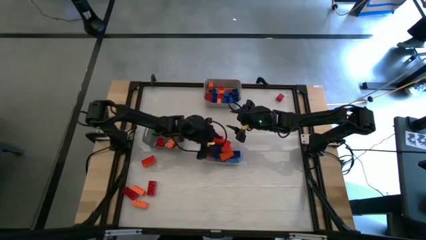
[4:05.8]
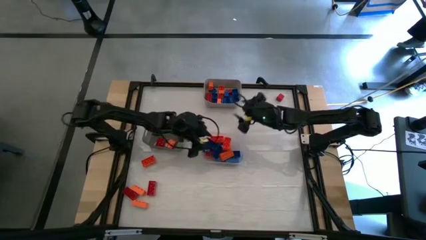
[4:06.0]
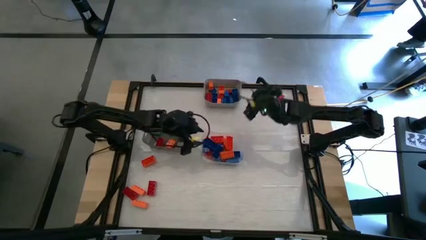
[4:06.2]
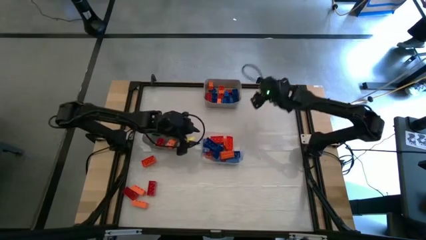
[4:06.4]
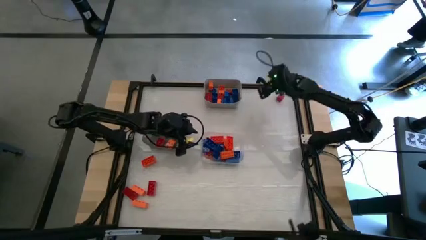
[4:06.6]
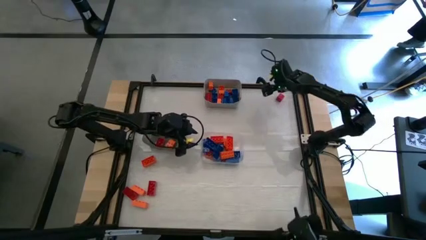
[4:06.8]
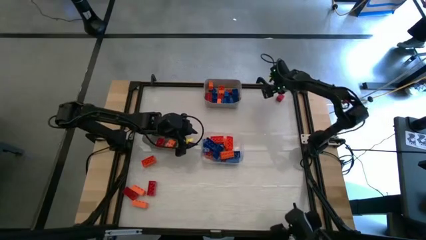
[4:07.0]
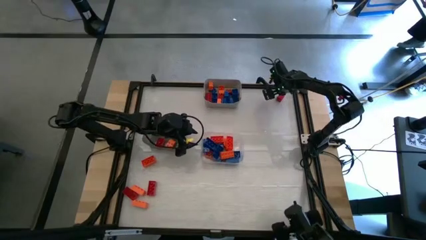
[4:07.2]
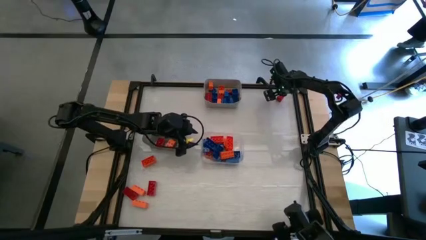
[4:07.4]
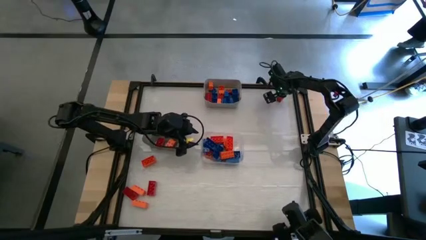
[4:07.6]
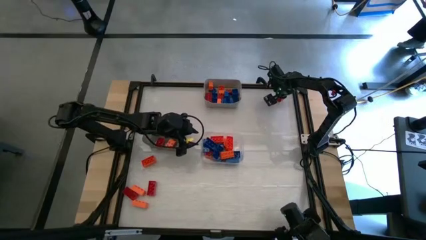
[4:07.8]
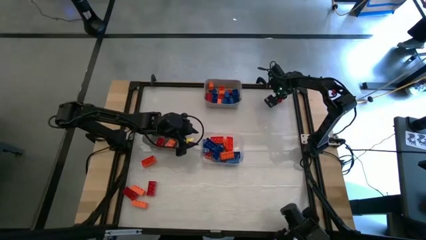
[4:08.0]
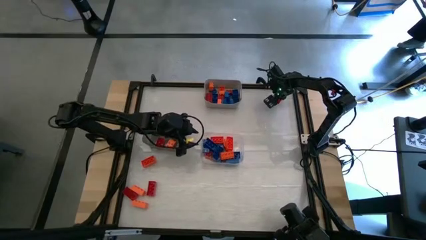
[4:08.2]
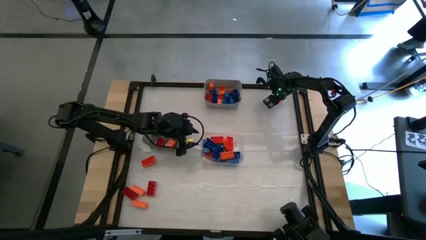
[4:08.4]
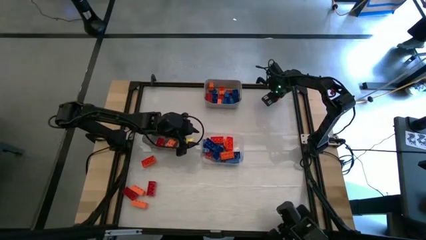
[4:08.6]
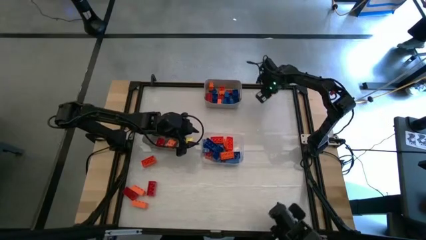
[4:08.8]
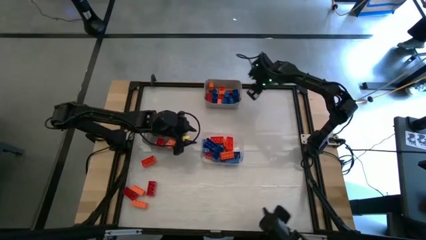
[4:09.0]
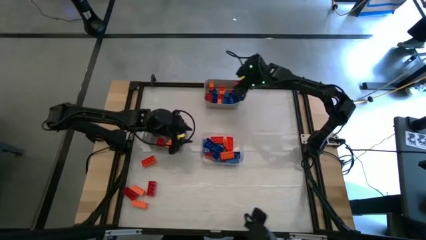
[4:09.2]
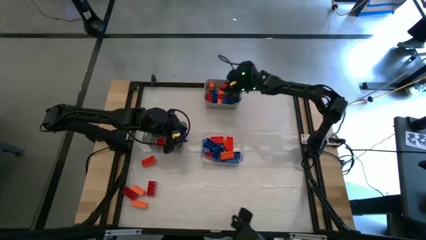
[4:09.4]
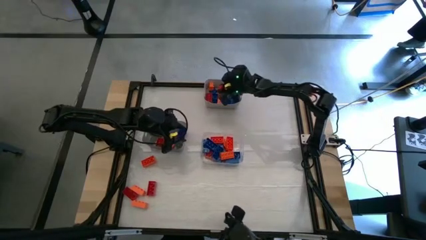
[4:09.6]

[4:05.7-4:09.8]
Task: Sort blocks by size
Put the small red game piece into the gray bin

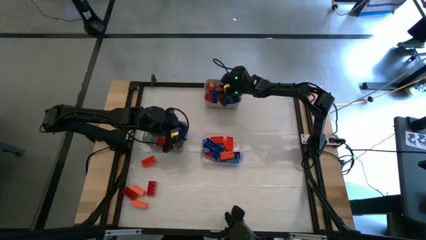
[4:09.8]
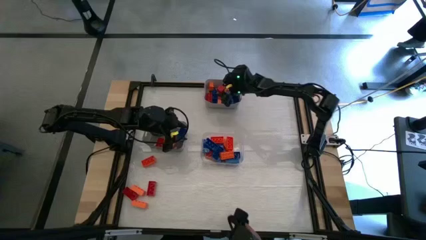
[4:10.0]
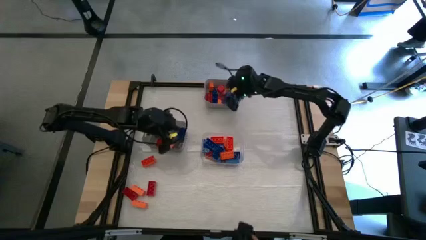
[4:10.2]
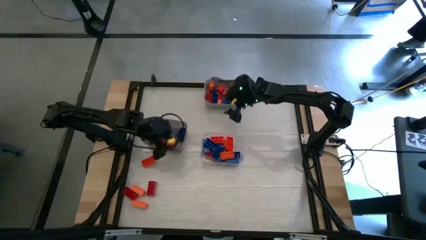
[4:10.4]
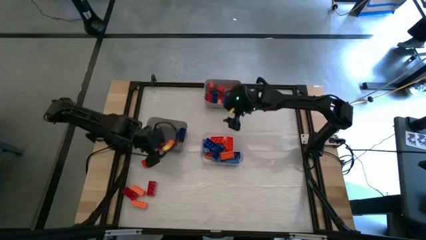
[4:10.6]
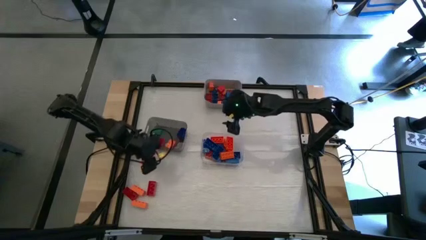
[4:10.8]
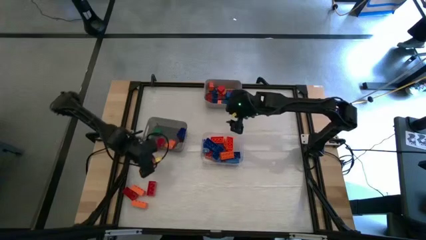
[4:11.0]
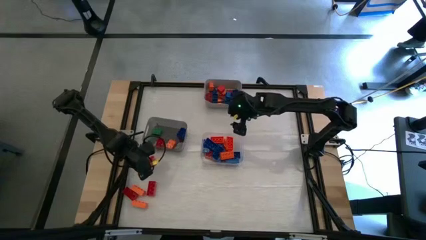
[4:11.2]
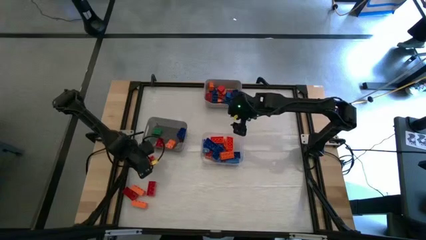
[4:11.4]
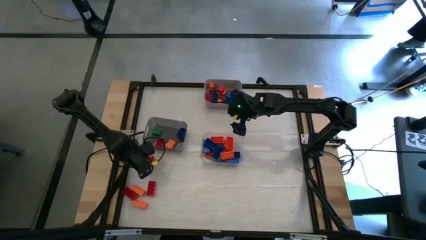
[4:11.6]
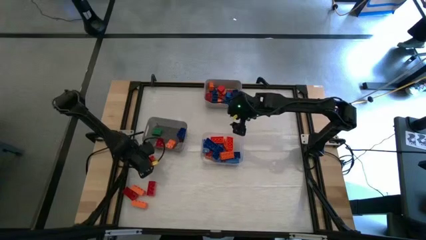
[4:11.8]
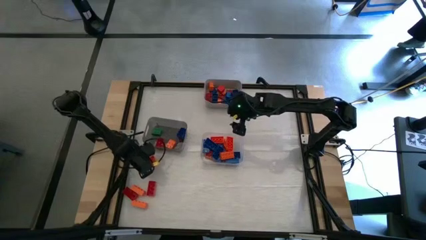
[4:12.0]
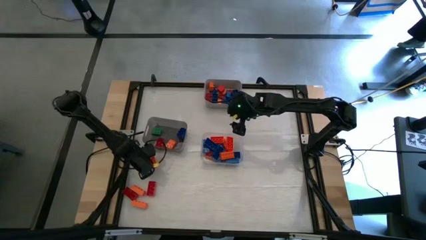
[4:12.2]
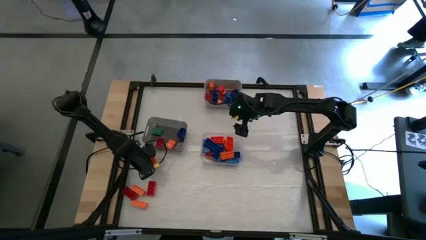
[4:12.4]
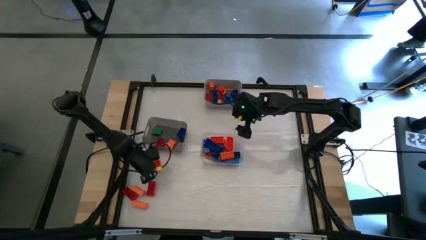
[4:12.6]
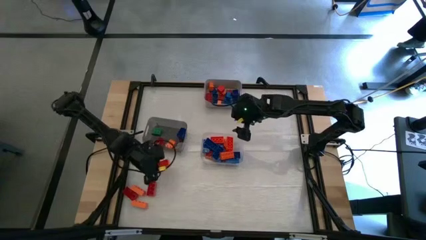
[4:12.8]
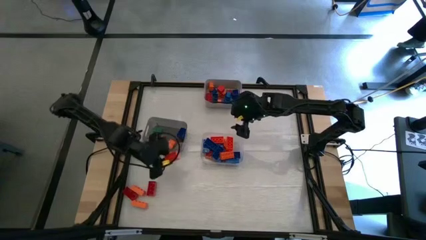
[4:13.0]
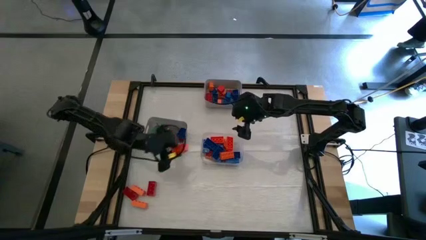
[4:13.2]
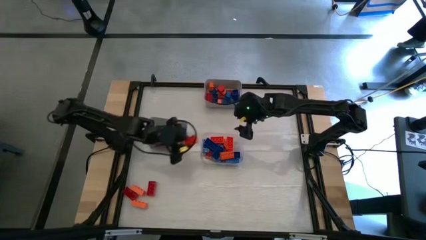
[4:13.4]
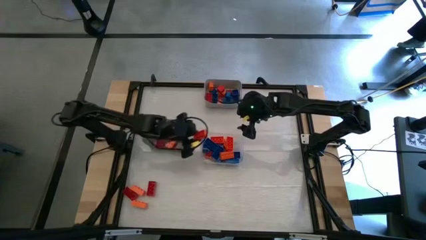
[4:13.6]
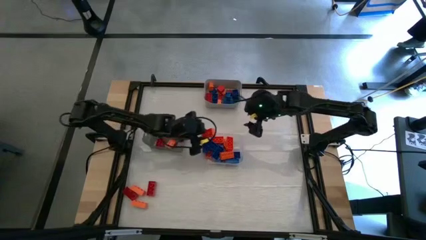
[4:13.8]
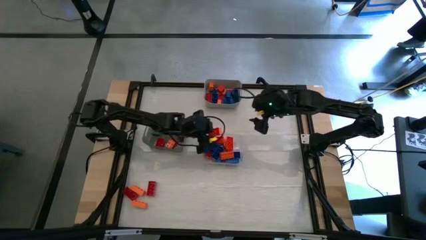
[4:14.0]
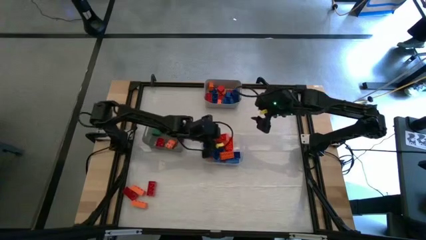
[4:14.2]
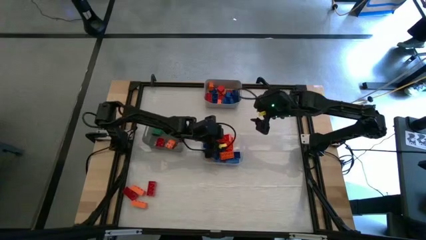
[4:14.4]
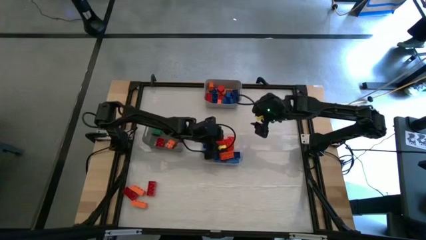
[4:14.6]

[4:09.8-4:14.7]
Put the big orange game piece into the transparent bin

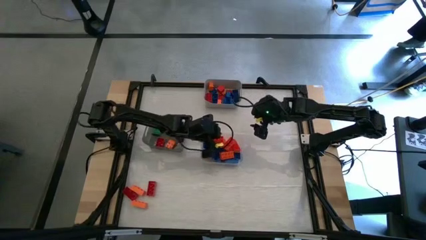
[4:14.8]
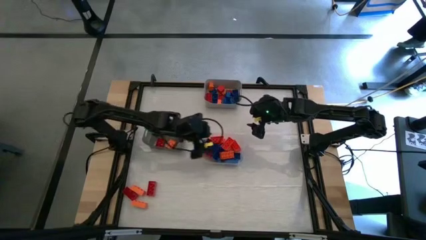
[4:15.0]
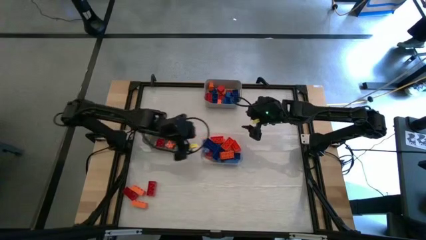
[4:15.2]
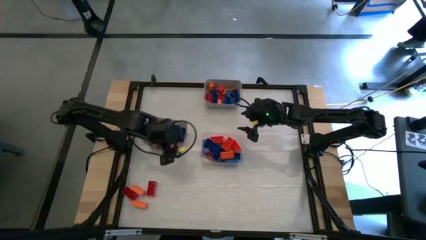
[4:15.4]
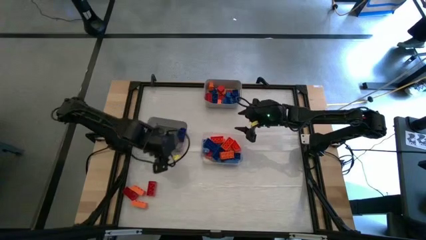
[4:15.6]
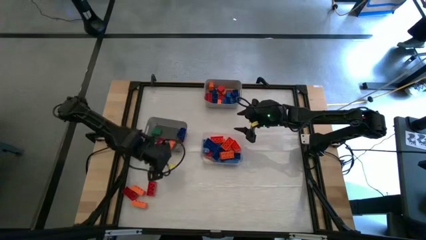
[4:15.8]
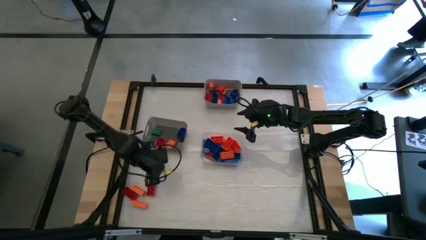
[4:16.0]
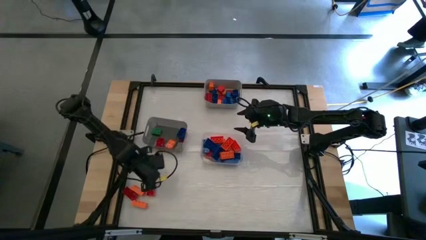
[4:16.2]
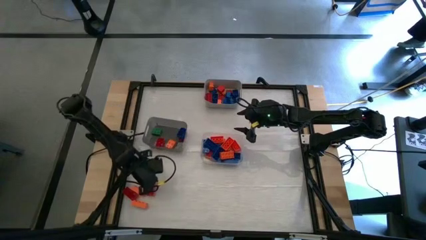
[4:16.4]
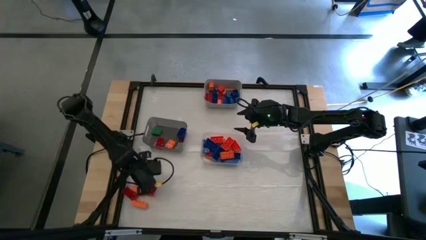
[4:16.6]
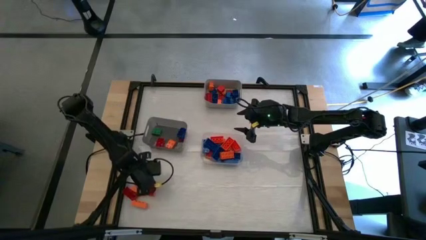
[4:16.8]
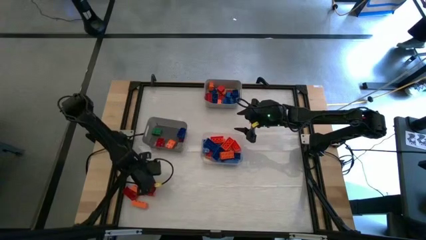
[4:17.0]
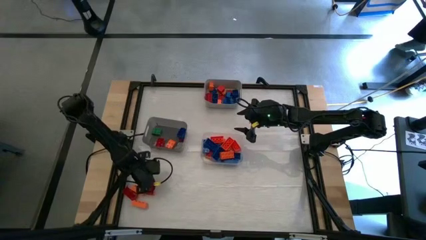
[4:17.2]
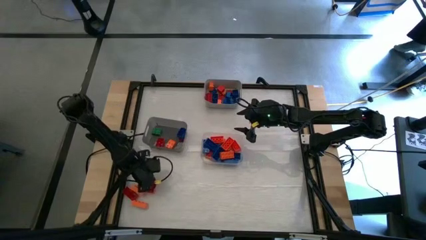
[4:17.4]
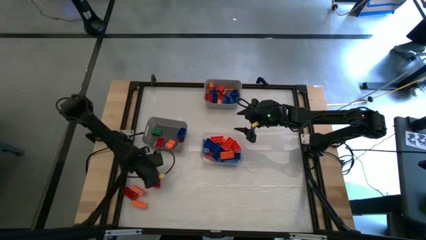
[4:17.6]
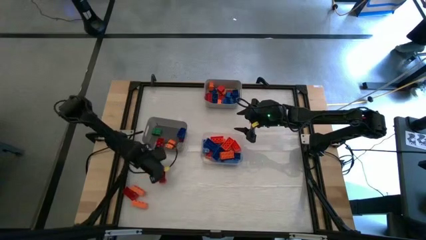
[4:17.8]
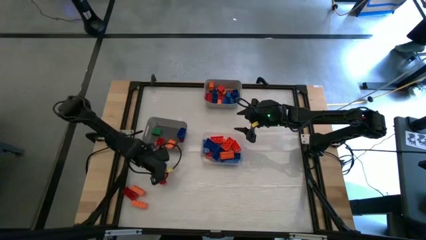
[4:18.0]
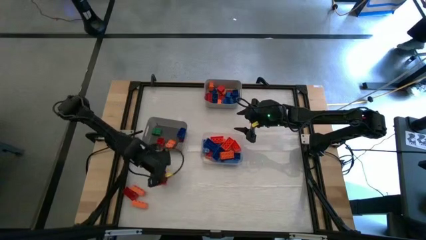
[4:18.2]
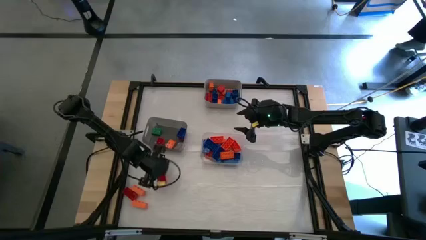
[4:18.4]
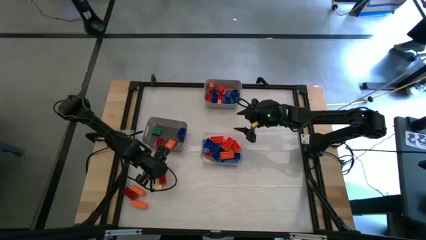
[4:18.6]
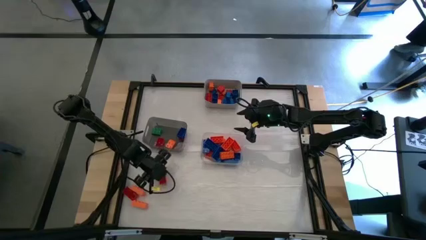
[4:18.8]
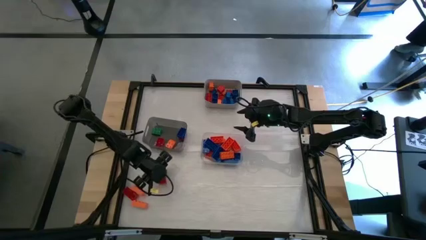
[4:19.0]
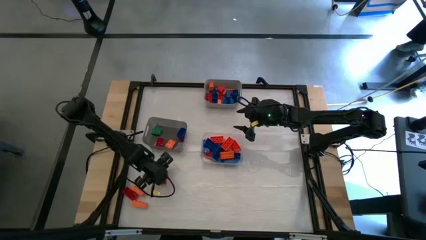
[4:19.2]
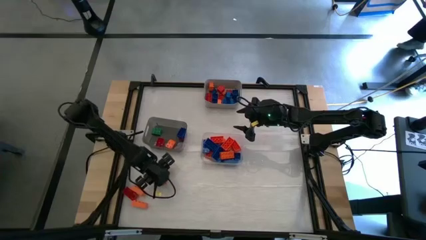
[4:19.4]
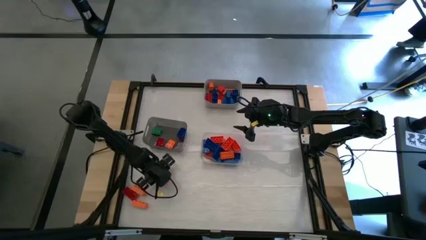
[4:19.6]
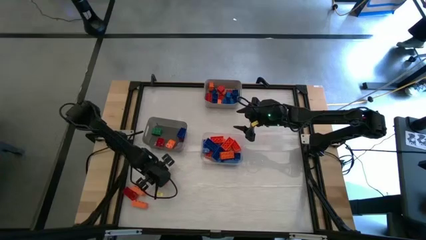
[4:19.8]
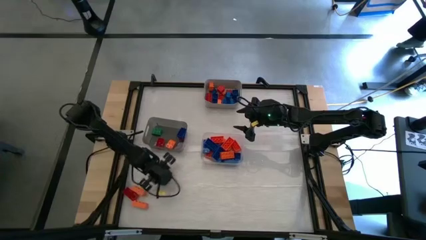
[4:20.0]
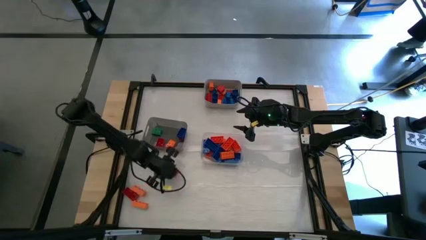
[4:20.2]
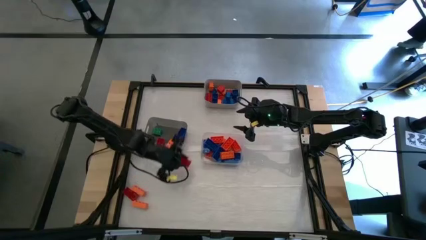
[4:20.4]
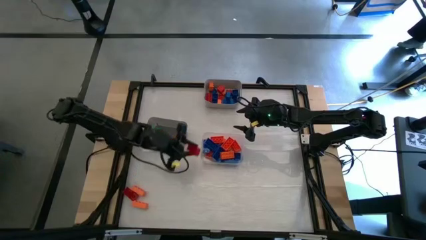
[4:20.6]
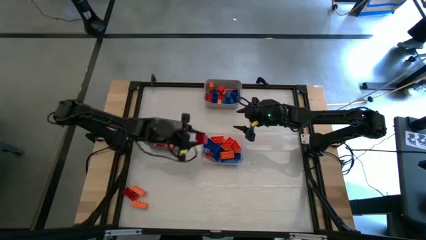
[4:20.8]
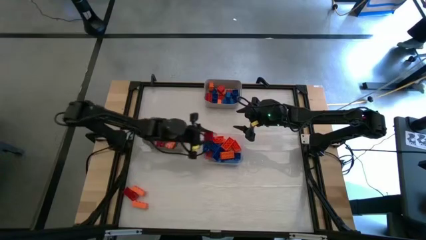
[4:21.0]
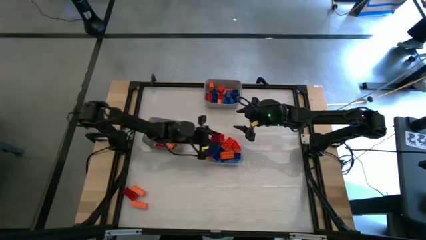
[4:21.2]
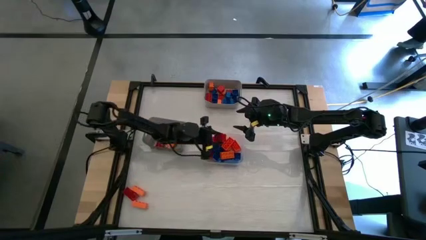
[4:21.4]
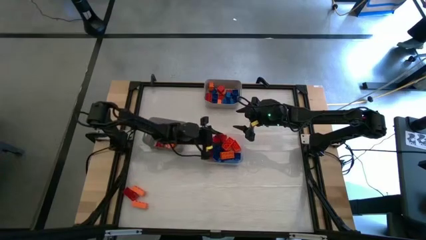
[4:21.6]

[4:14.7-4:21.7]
Put the big red game piece into the transparent bin
